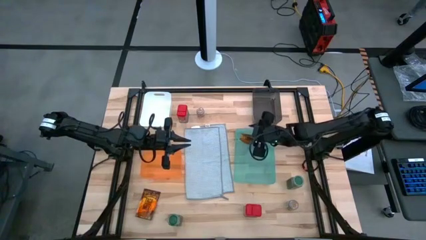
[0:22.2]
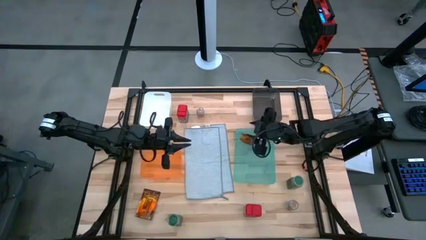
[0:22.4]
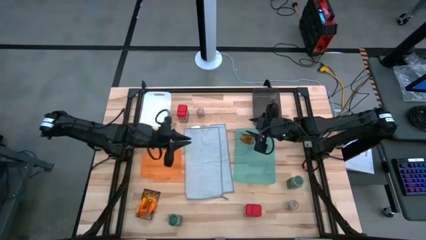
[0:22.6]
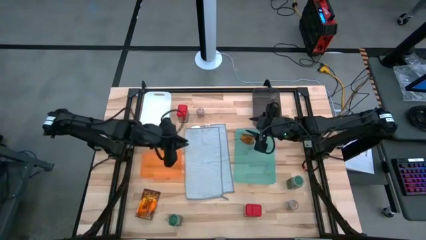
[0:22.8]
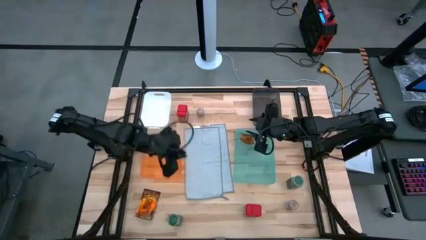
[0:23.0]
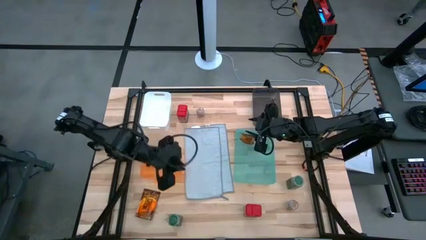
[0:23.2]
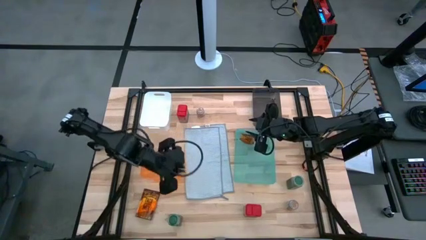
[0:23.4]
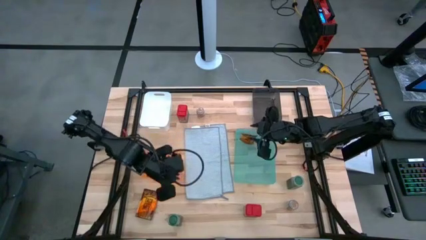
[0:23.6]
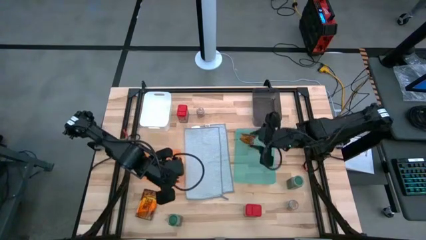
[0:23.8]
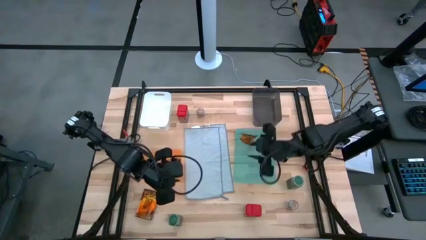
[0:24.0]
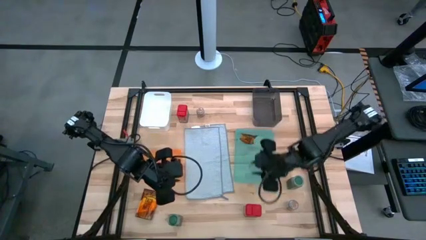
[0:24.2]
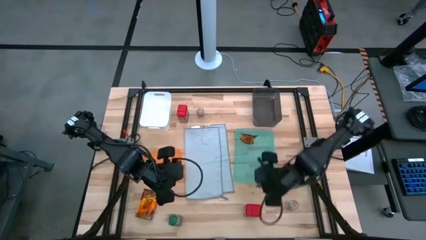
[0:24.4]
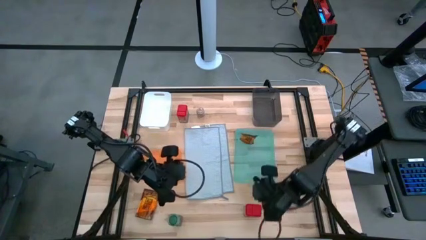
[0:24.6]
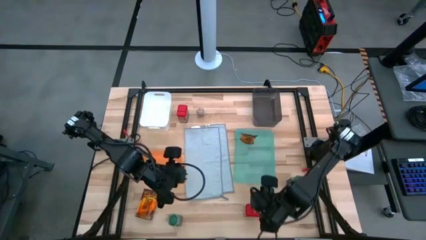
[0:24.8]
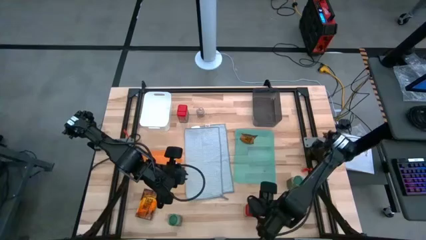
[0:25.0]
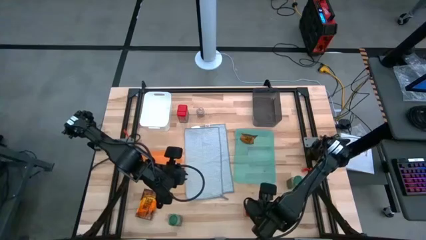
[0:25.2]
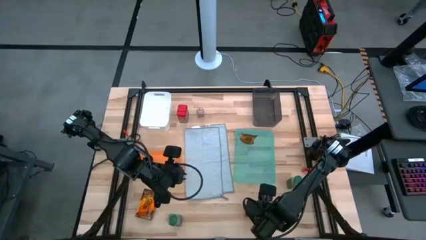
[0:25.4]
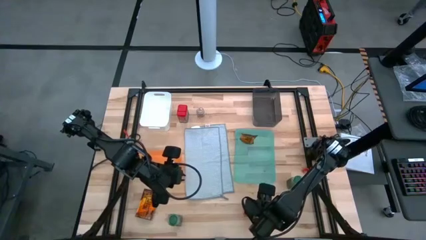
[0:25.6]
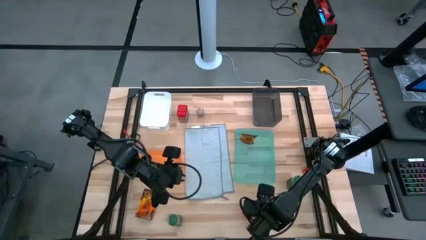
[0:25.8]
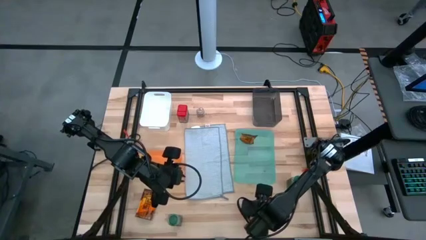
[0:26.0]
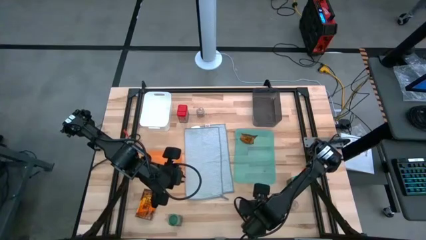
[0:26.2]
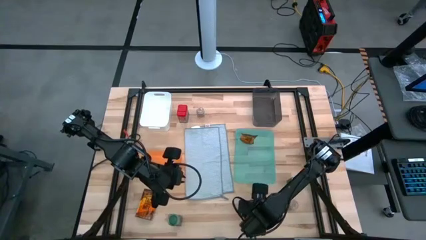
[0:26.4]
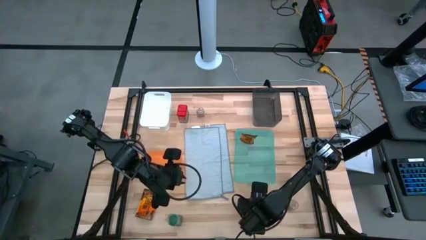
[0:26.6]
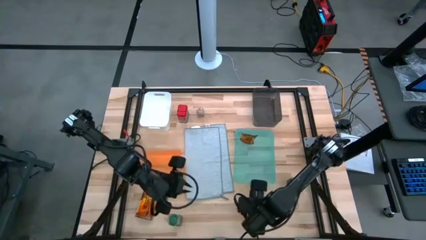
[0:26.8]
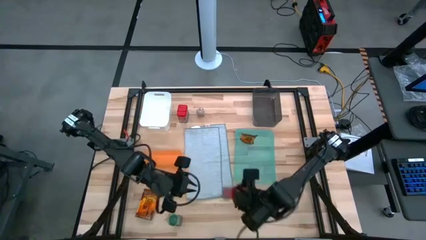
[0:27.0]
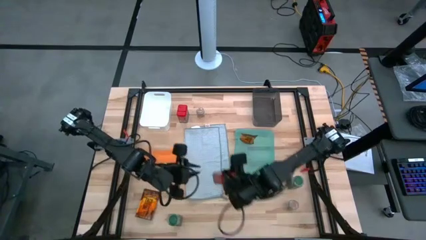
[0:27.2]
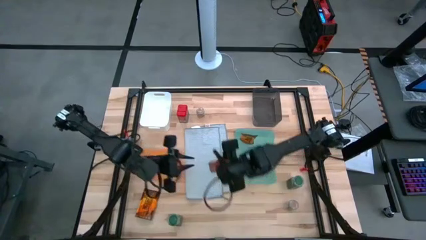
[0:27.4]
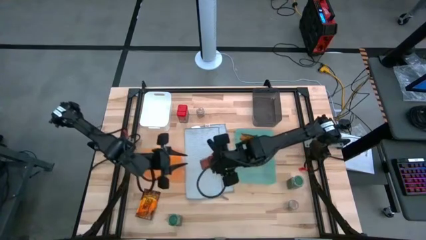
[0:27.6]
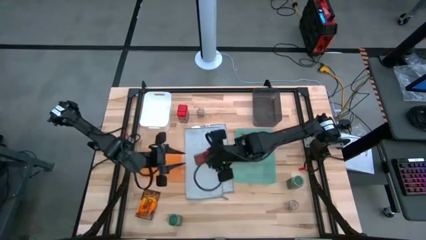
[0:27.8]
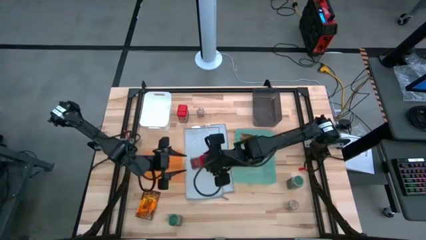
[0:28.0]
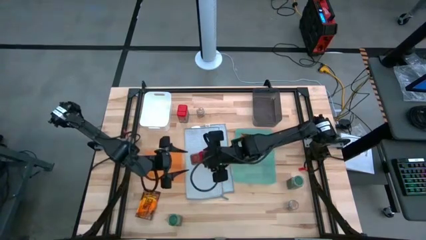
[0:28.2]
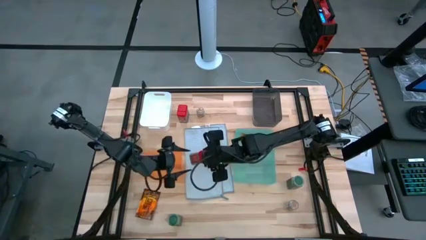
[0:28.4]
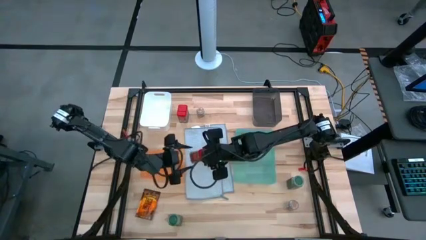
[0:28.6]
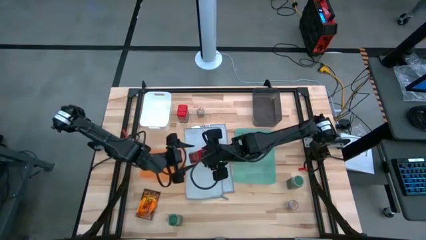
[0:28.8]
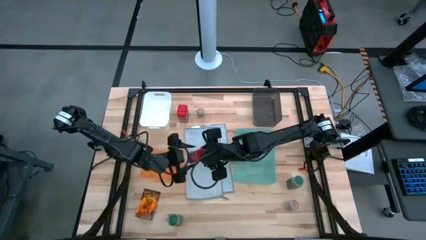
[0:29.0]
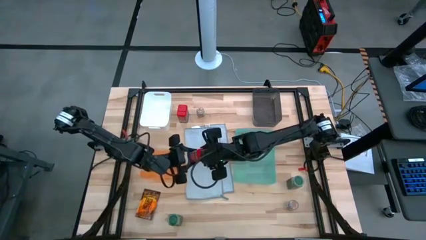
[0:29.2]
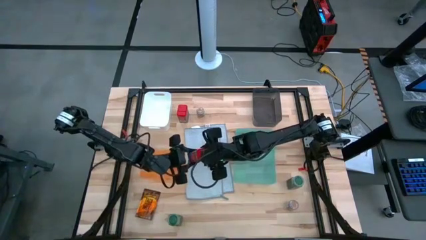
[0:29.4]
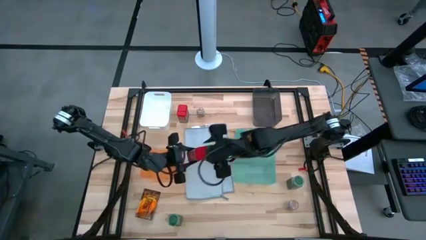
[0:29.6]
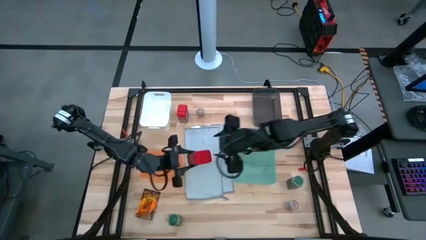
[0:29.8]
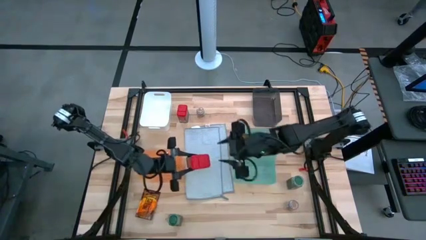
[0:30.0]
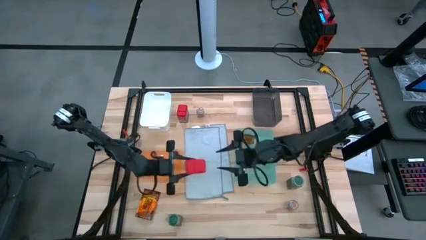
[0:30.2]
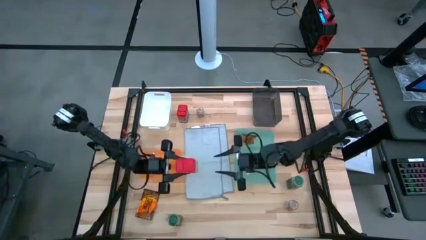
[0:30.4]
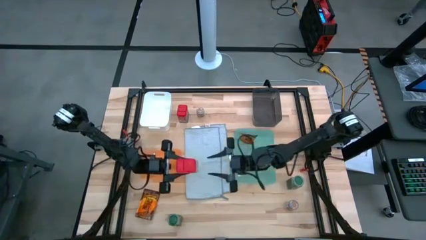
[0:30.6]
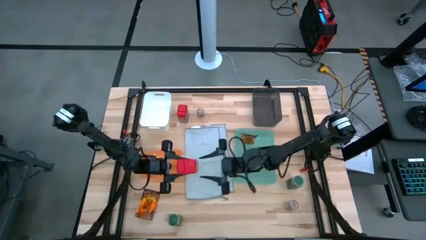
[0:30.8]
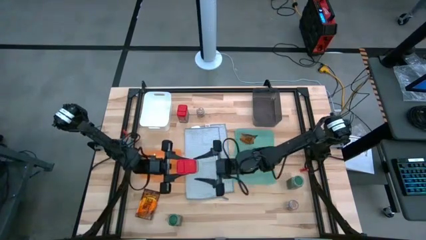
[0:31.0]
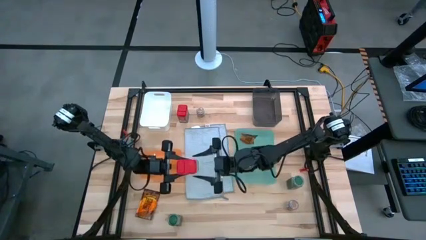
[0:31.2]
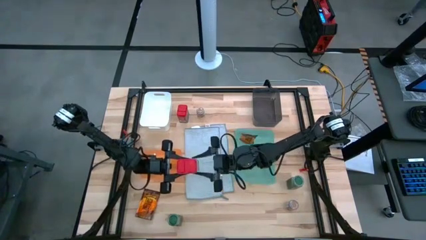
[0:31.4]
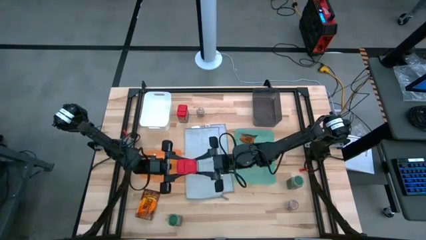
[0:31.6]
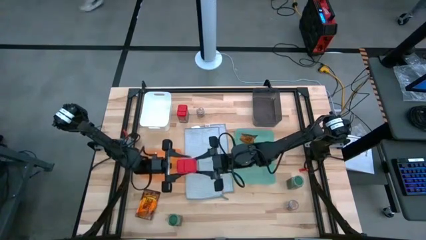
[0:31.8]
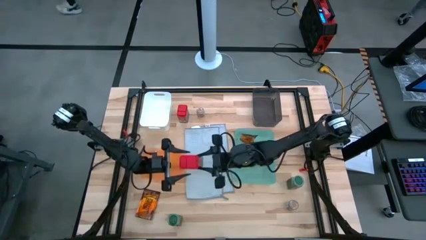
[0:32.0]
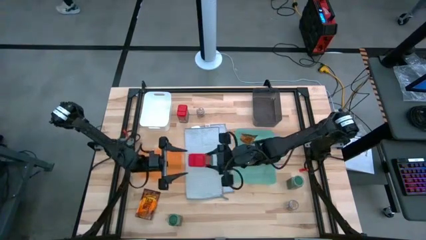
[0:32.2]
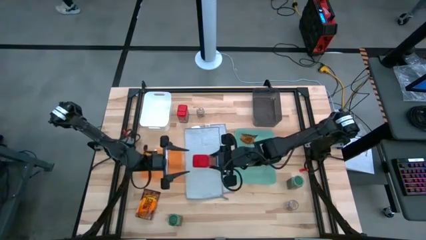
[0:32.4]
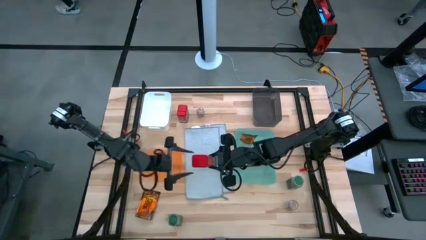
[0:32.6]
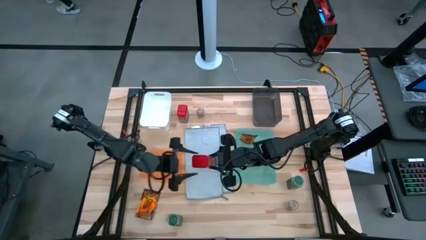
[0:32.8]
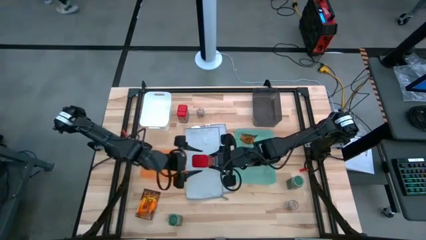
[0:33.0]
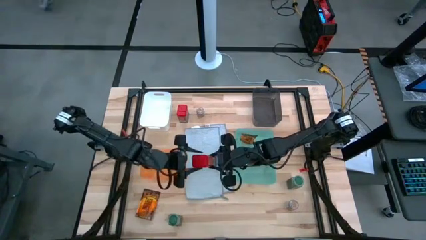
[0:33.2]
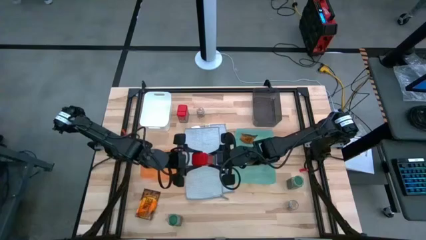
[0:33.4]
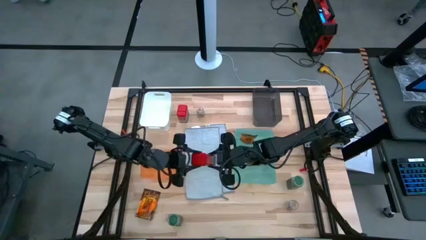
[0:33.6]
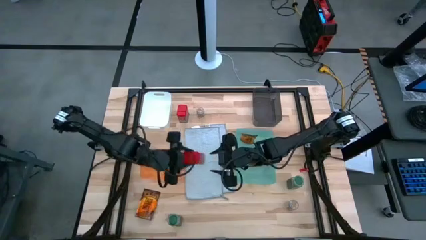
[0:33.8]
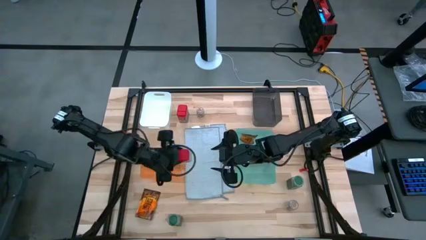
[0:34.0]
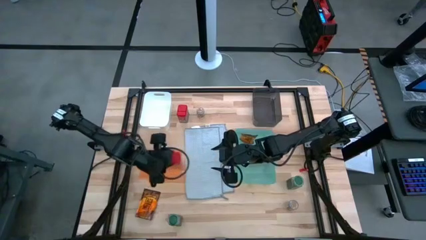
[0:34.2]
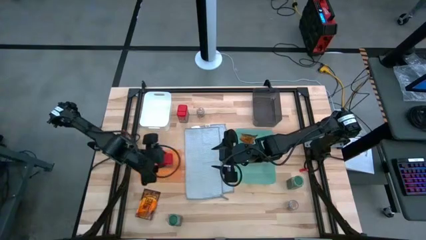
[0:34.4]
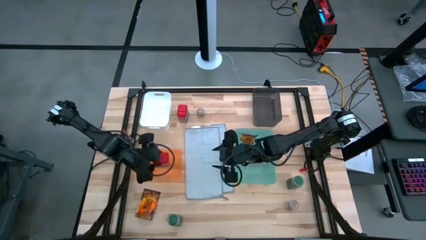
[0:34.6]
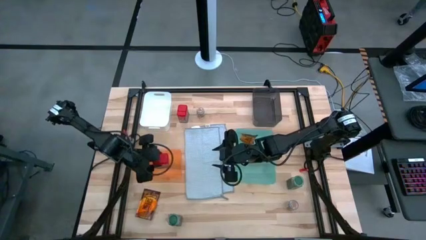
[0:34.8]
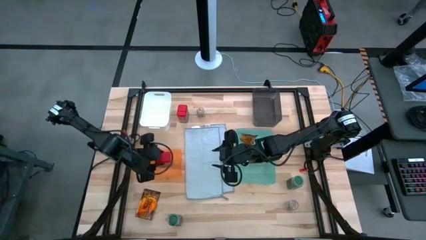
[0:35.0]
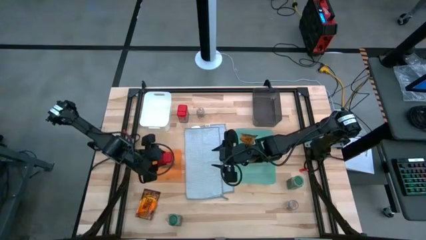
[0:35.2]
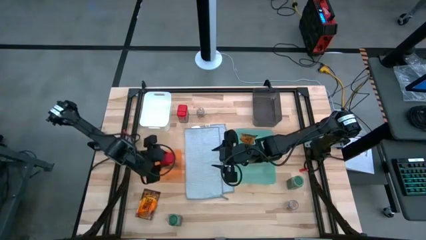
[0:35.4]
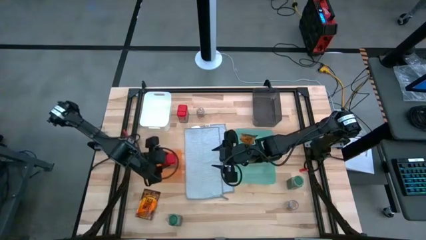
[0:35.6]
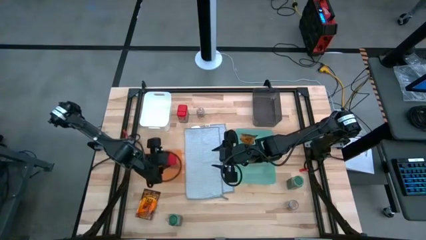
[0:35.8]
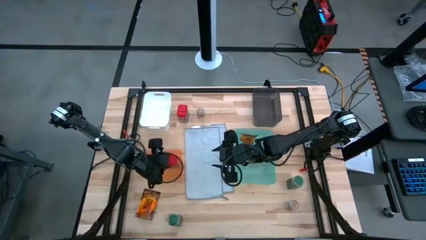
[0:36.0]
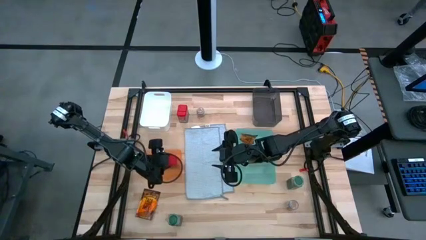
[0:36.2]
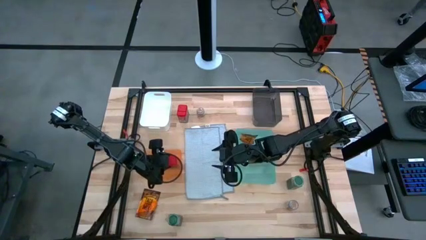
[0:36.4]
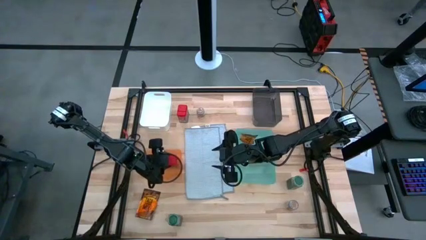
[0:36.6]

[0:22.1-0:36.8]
Task: Sort spices by type
Put the bottom red seasoning can into the orange bin
